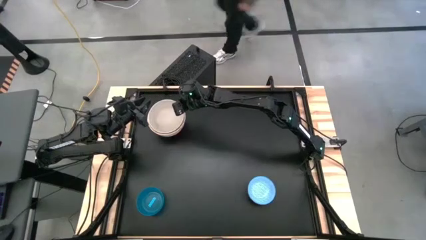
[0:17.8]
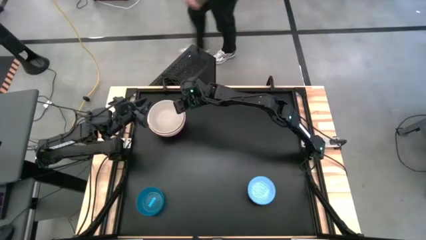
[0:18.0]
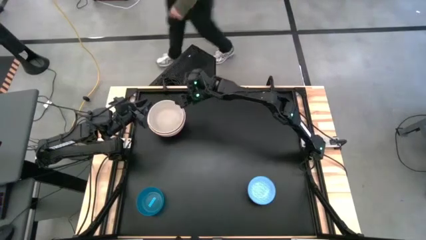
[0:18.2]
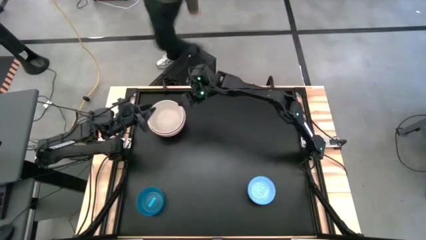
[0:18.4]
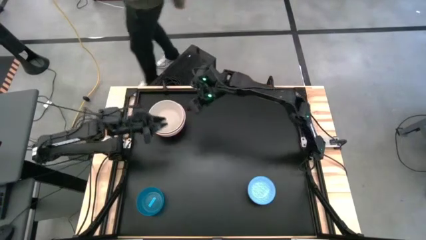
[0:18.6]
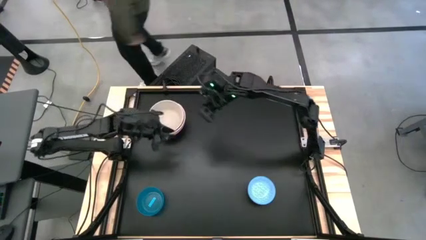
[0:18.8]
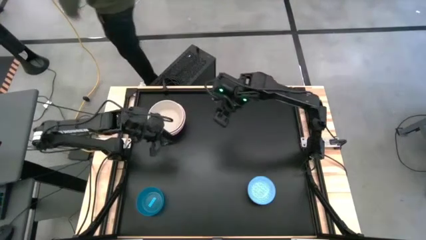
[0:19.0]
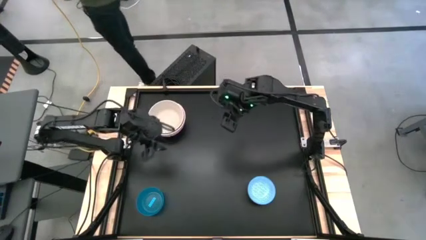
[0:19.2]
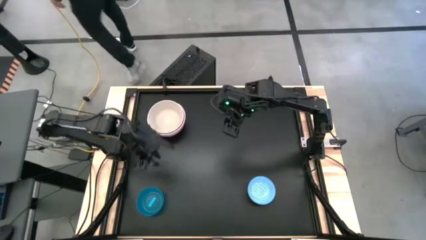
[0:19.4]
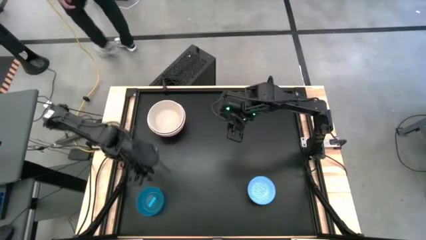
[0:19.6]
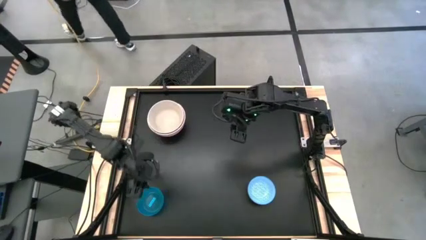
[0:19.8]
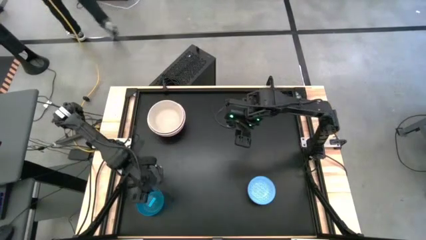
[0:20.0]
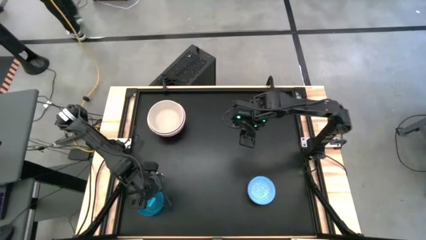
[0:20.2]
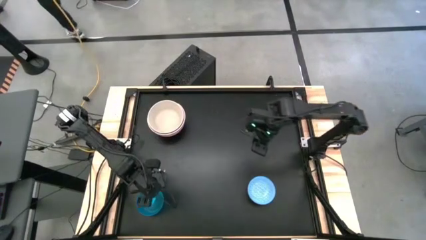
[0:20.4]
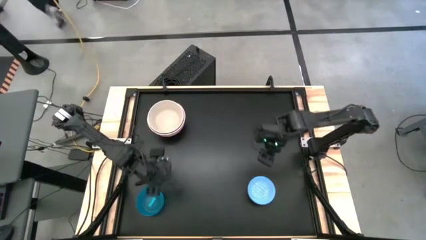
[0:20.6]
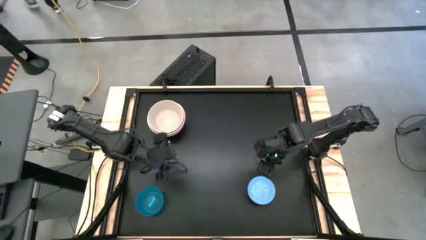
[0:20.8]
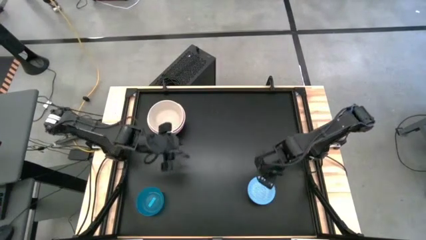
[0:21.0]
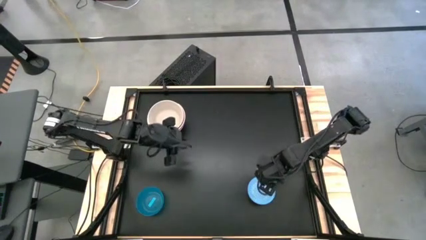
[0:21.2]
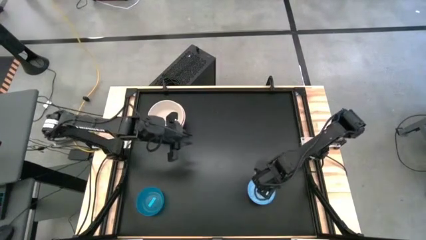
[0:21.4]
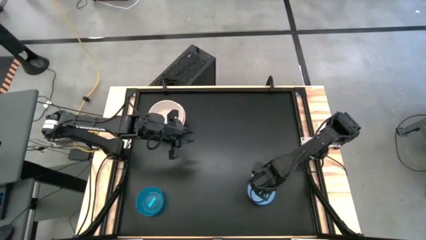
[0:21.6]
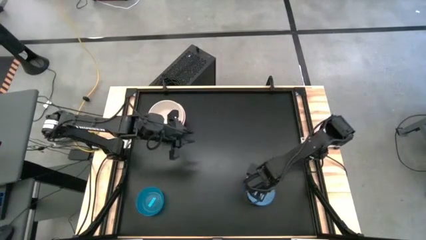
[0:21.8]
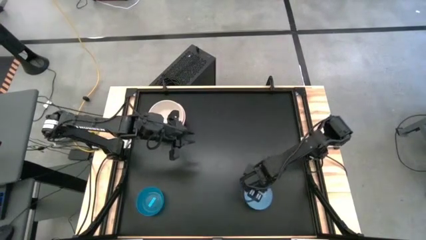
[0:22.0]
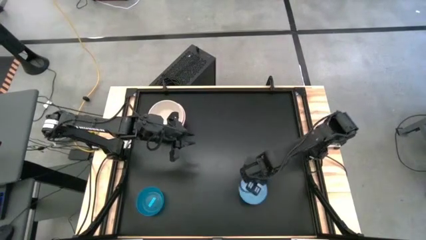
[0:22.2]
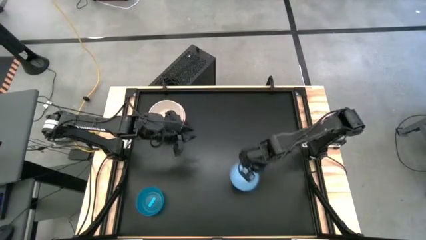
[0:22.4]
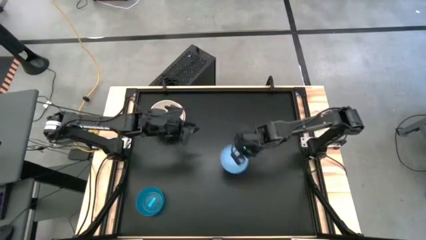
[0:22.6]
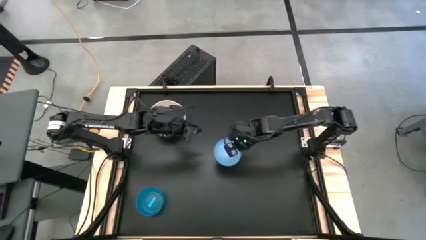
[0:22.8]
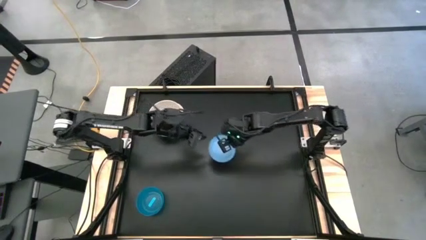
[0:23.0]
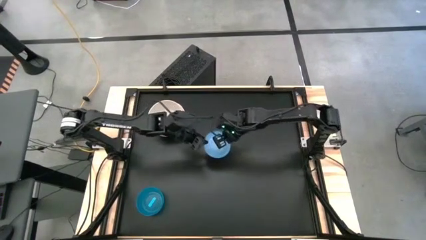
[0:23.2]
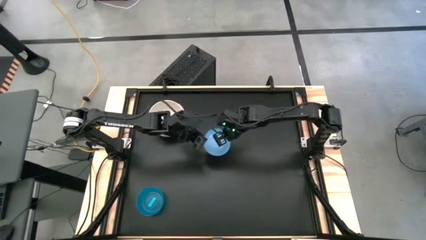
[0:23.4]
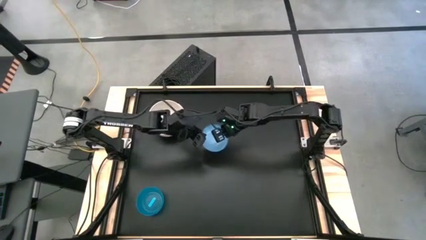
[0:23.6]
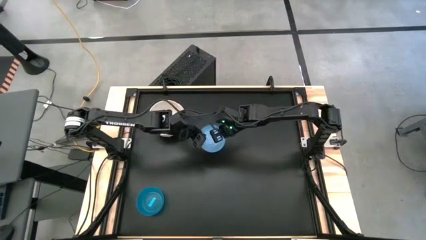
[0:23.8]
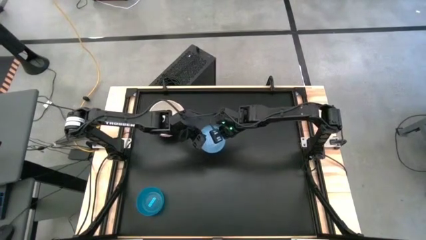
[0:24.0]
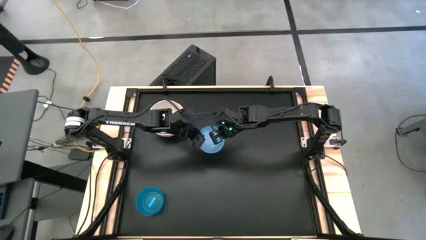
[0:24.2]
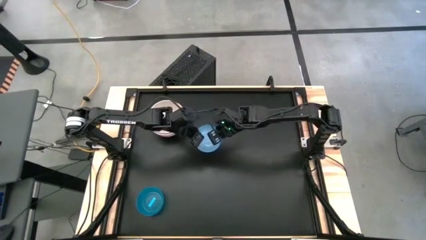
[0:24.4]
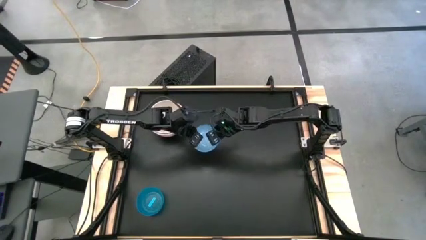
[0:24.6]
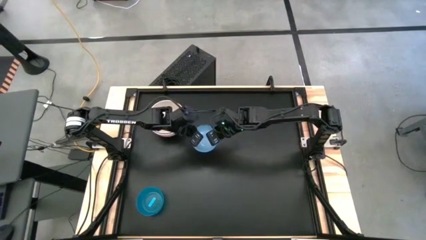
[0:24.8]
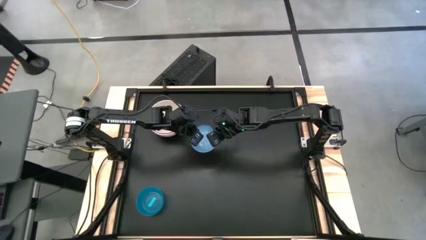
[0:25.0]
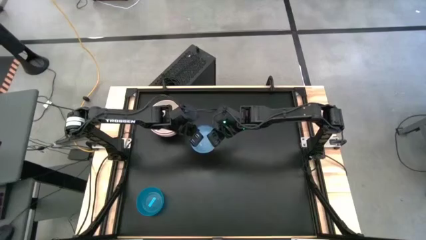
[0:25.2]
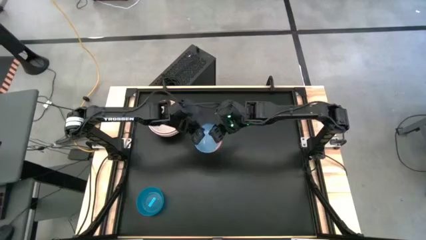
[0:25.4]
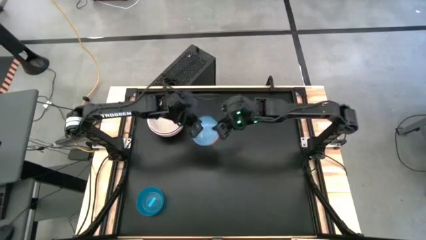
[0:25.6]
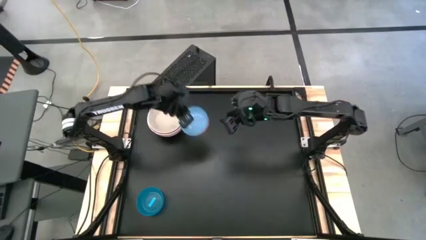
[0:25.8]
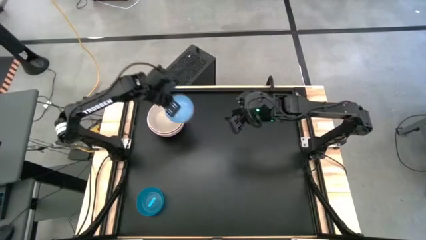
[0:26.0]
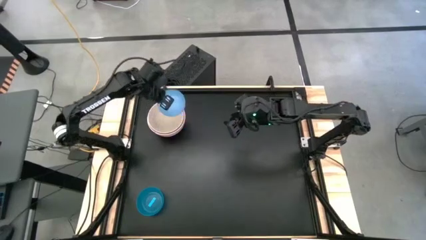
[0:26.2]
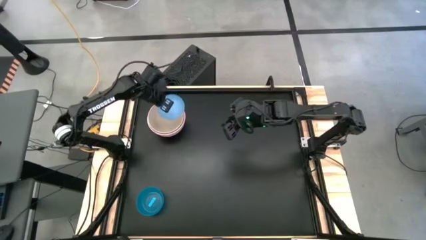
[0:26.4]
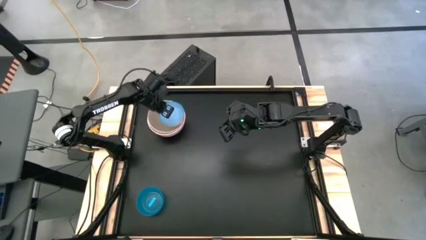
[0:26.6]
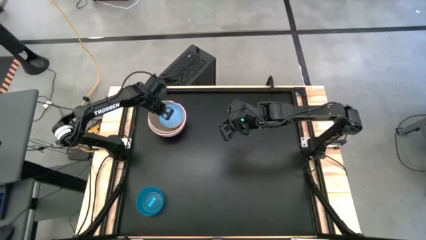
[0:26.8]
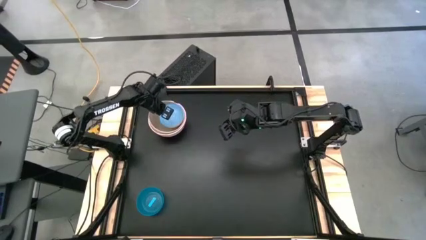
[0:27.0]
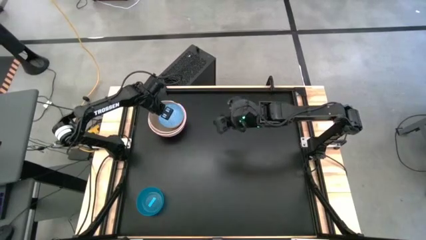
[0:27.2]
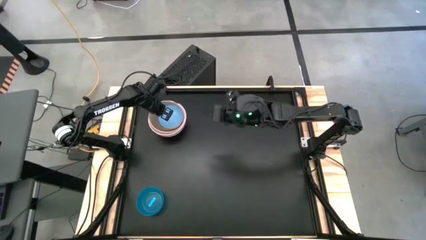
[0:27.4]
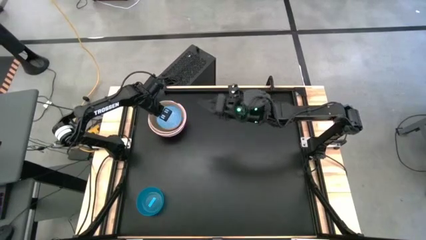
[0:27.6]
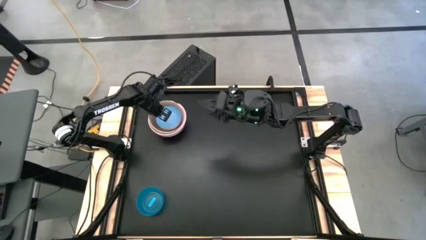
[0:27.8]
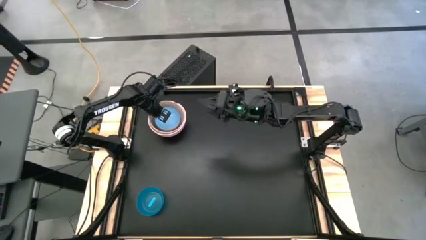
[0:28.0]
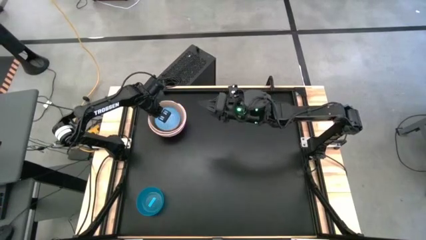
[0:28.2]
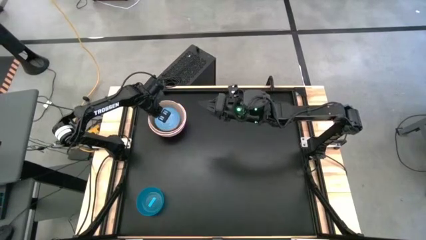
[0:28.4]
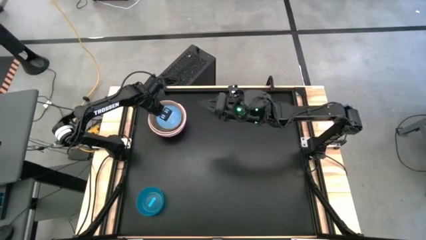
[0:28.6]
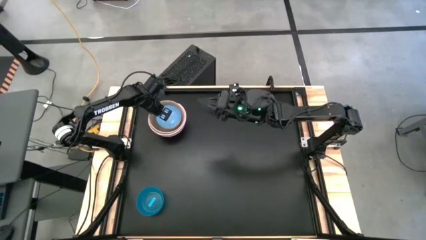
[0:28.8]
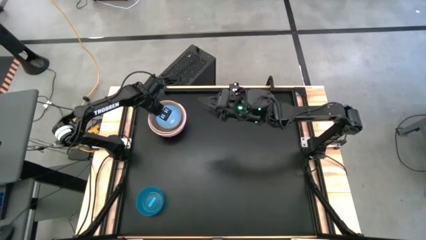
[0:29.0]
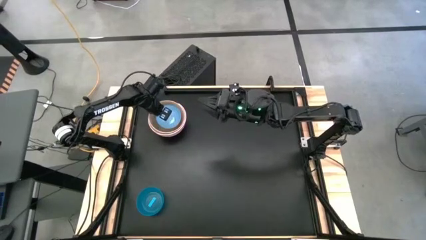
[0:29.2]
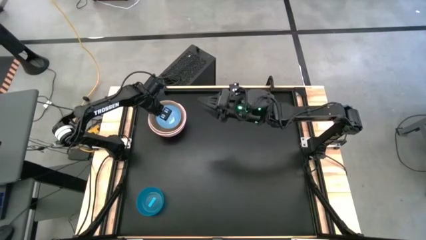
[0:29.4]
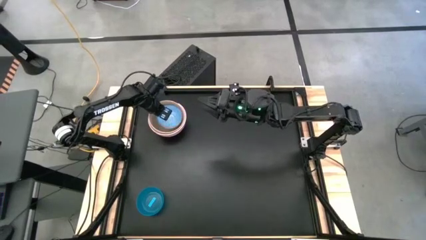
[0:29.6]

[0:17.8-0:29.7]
Stack the light blue bowl on the gray bowl

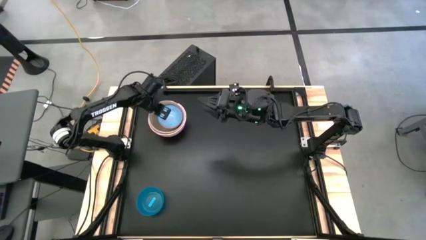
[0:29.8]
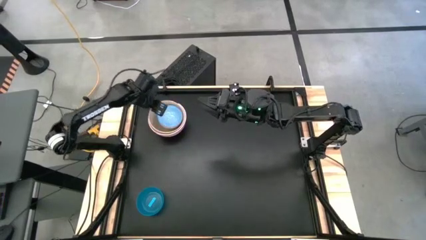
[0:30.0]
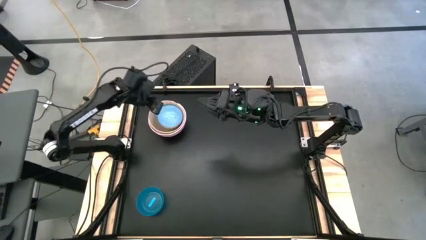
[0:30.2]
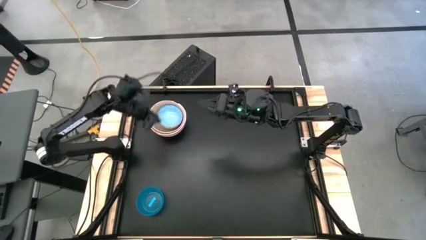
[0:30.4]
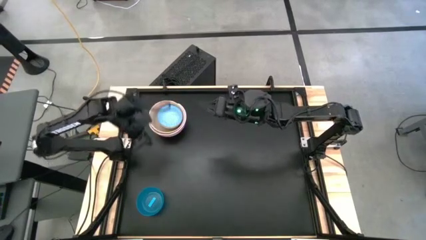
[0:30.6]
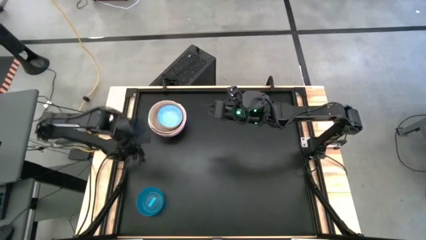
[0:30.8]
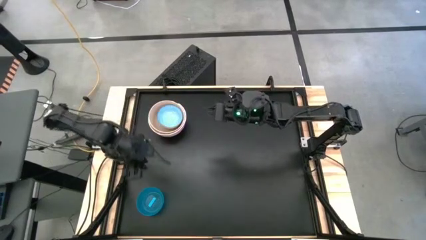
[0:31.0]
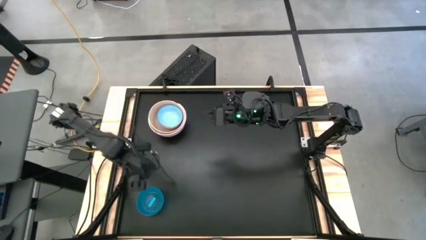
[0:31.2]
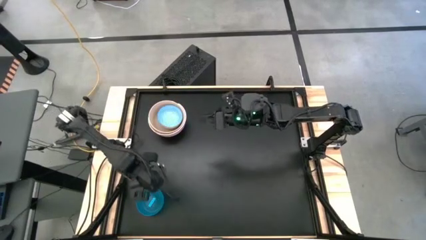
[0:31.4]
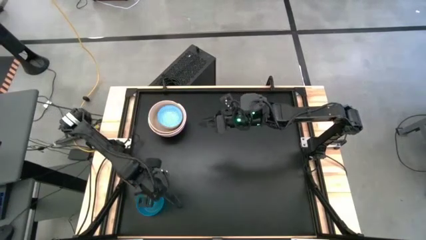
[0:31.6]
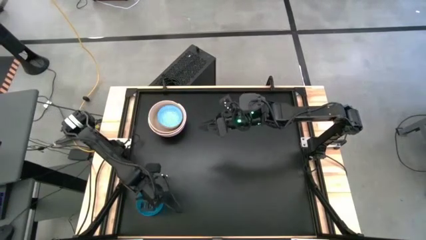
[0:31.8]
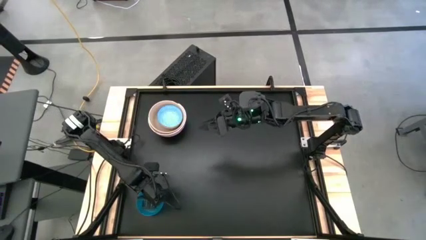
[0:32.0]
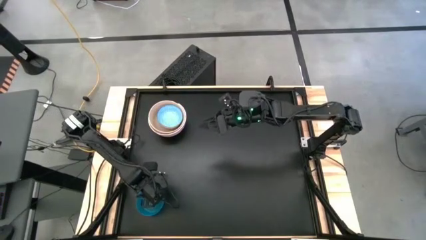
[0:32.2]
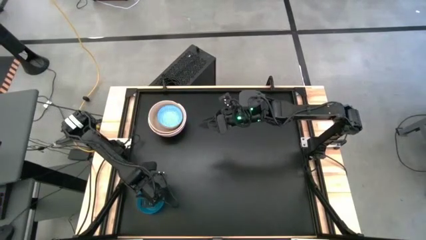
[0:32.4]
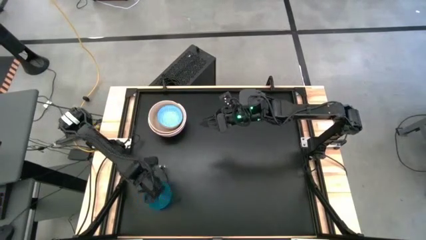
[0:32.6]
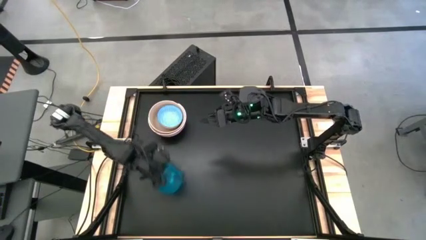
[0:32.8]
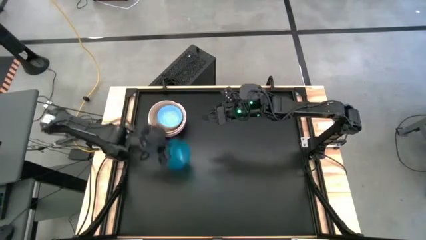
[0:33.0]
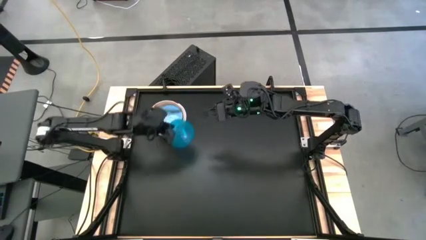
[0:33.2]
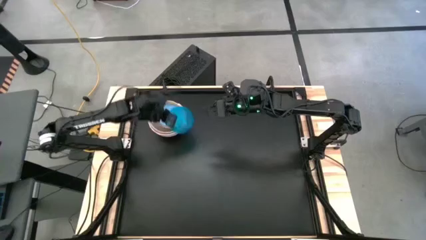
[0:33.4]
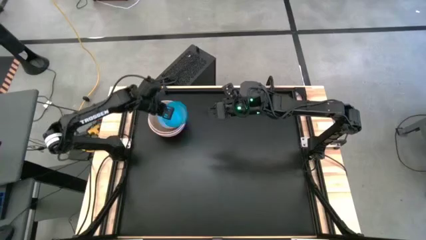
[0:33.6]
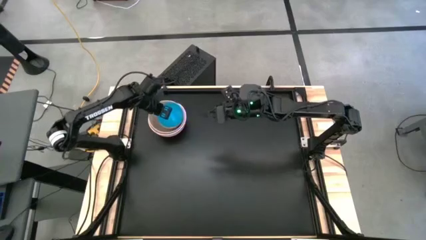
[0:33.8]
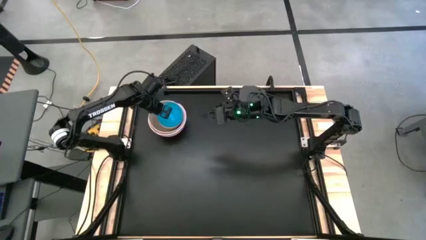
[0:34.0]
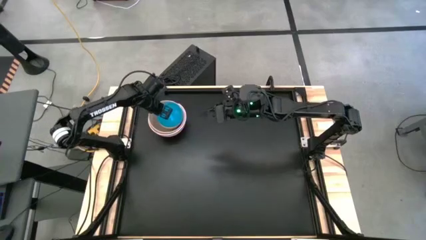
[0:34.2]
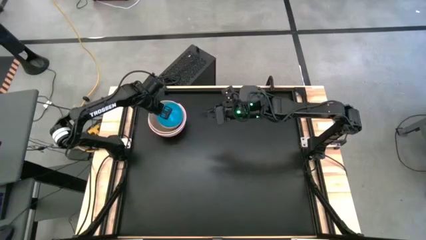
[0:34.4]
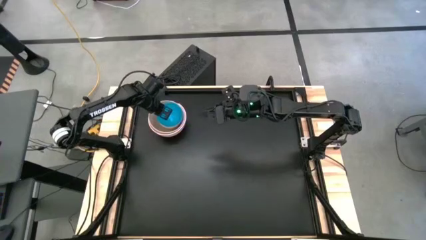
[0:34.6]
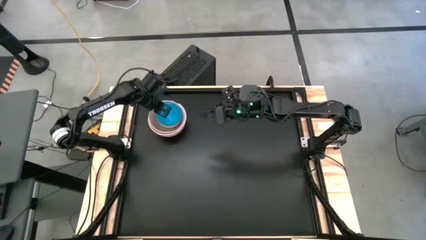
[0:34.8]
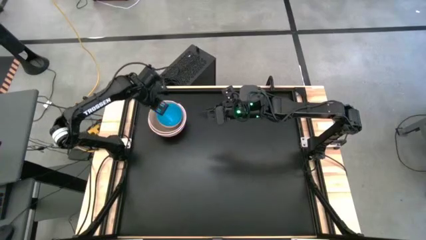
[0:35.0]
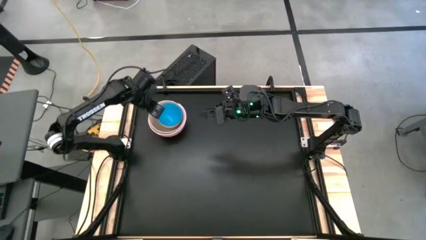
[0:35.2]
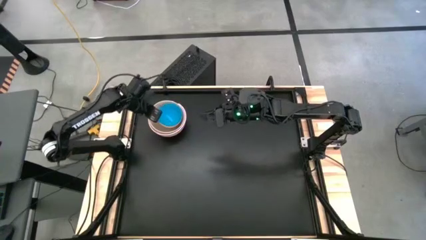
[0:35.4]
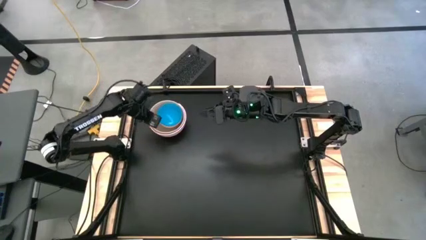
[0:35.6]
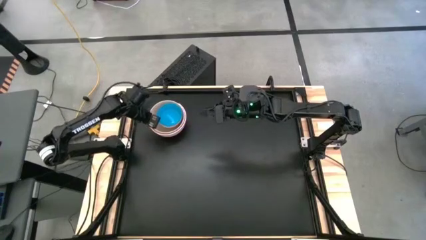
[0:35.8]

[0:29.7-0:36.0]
Stack the blue bowl on the light blue bowl
